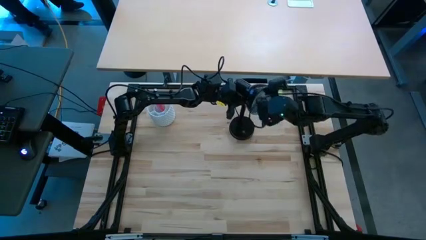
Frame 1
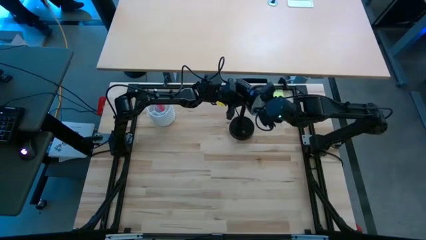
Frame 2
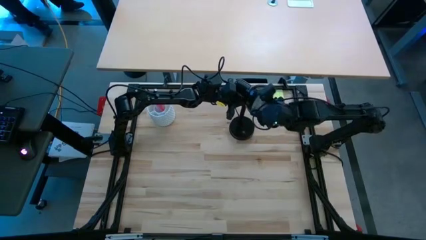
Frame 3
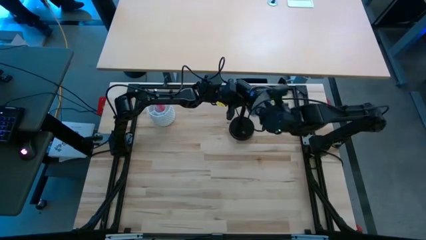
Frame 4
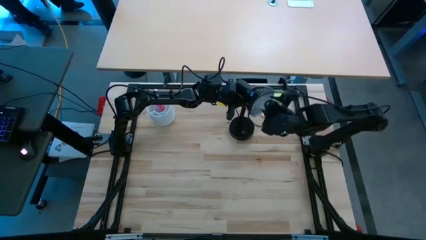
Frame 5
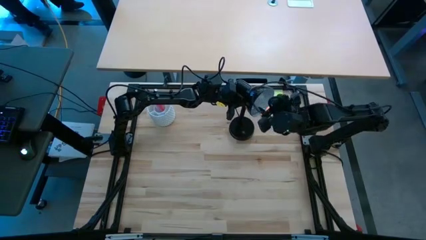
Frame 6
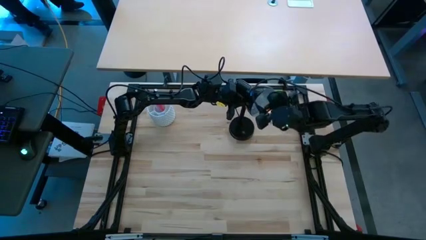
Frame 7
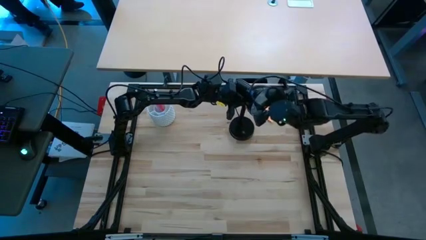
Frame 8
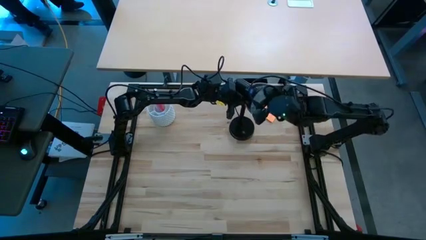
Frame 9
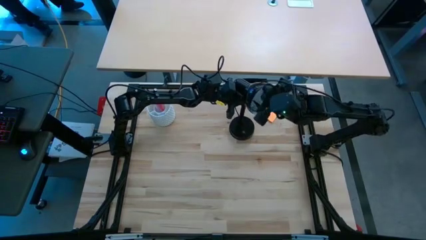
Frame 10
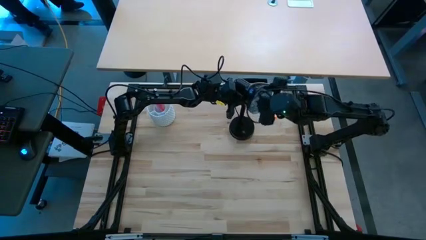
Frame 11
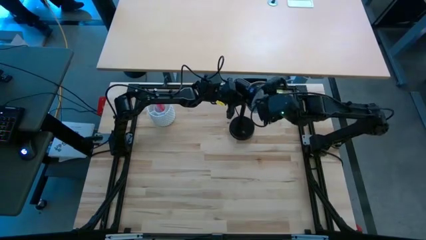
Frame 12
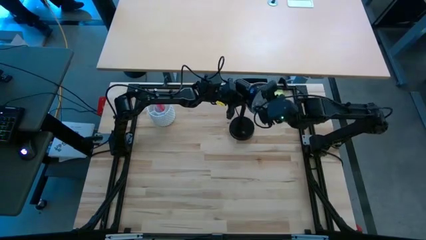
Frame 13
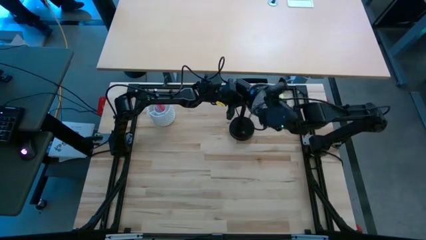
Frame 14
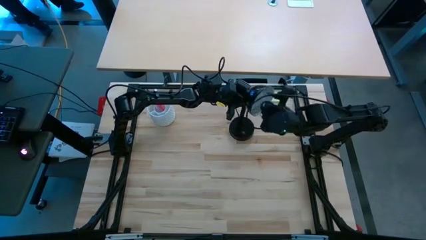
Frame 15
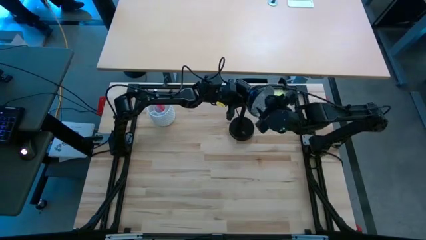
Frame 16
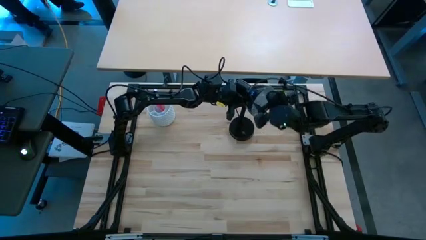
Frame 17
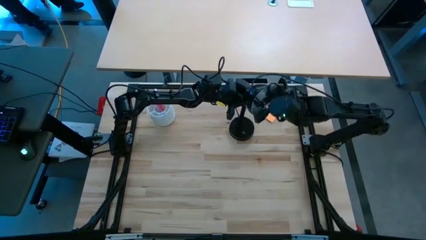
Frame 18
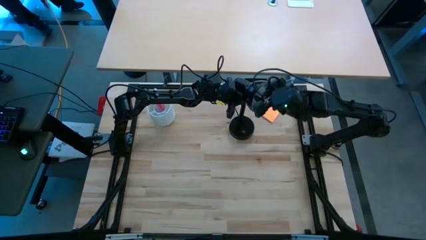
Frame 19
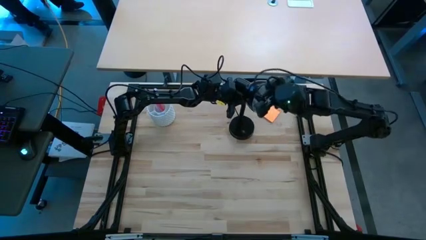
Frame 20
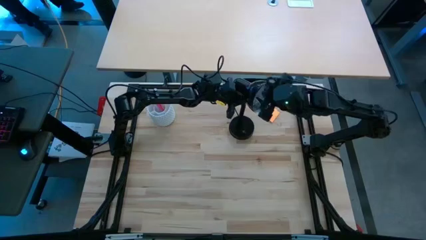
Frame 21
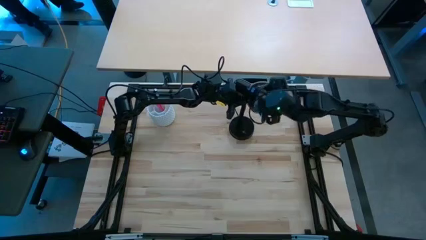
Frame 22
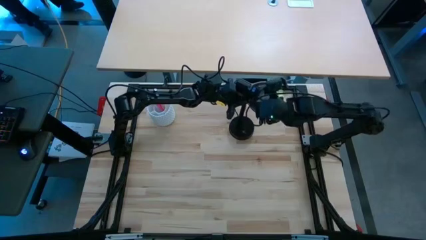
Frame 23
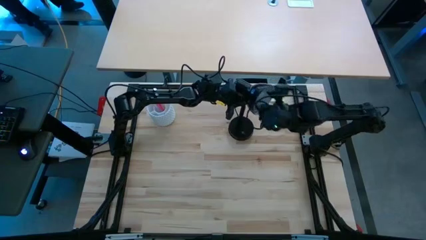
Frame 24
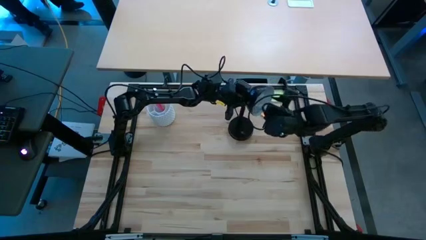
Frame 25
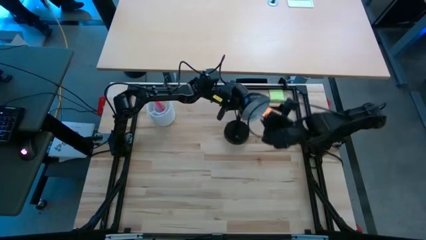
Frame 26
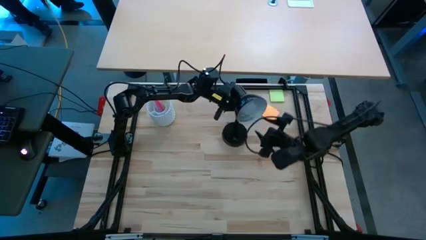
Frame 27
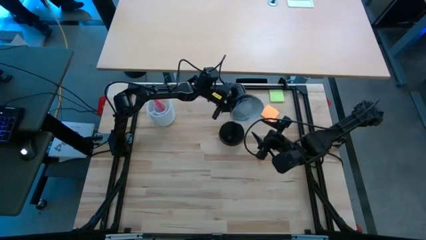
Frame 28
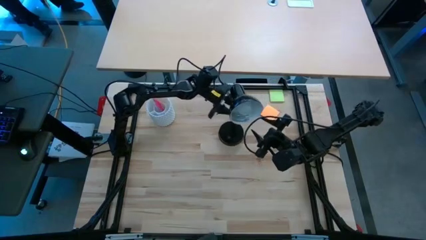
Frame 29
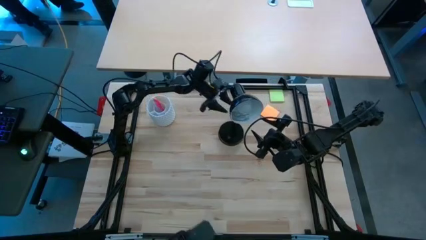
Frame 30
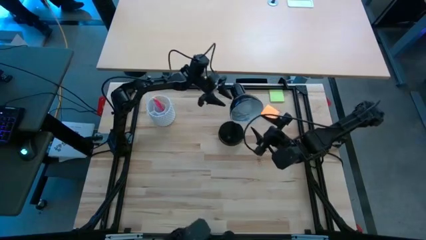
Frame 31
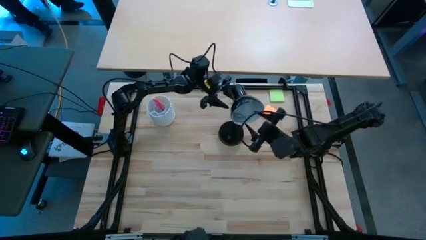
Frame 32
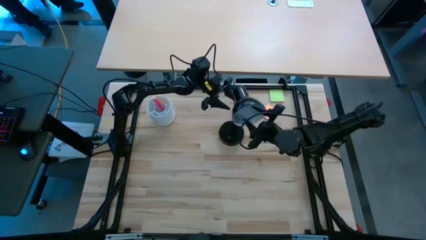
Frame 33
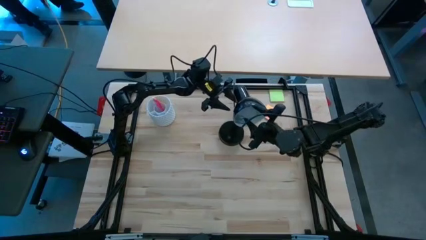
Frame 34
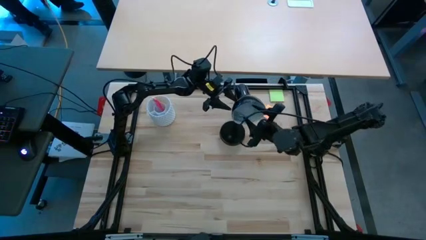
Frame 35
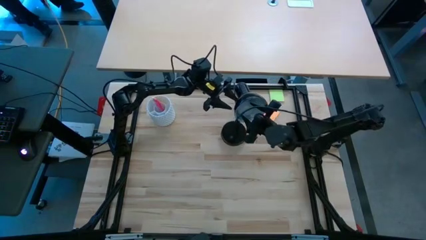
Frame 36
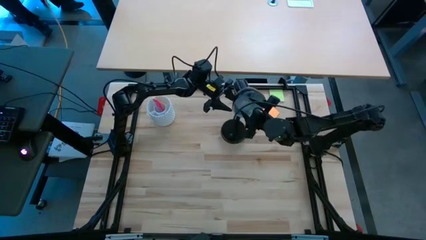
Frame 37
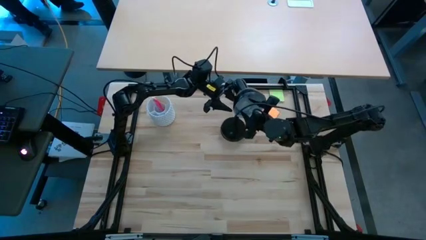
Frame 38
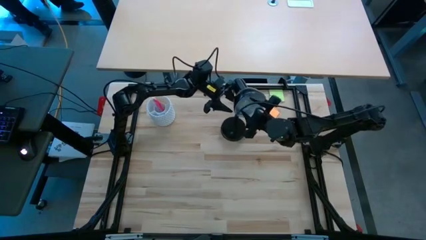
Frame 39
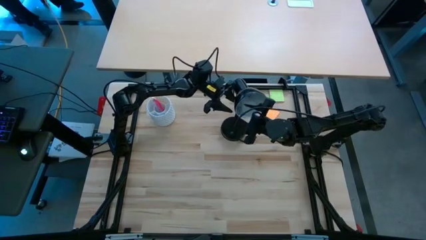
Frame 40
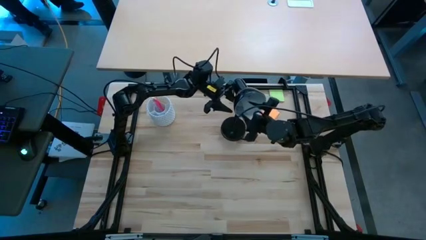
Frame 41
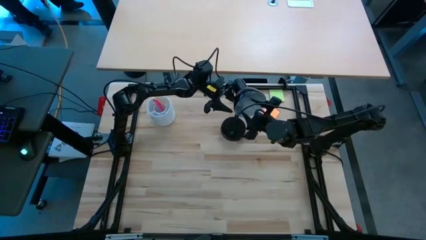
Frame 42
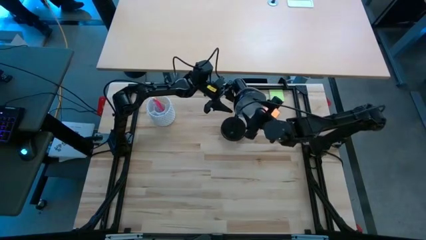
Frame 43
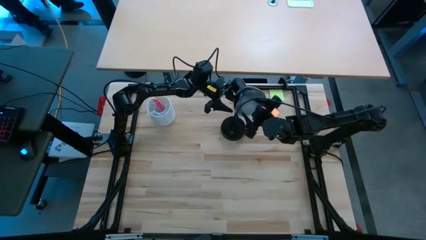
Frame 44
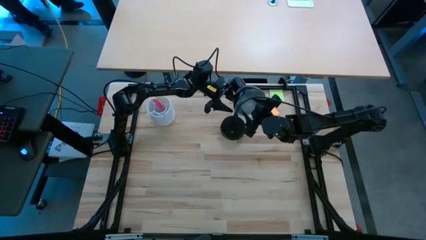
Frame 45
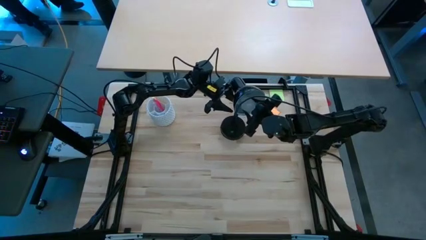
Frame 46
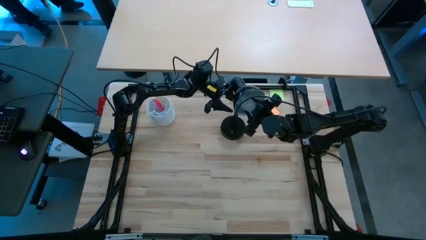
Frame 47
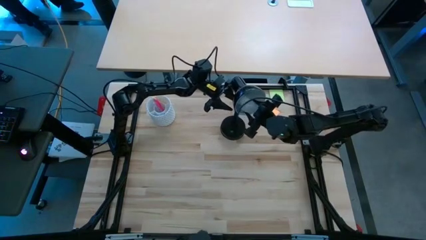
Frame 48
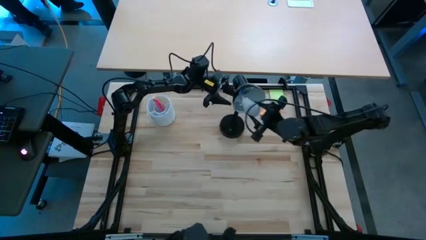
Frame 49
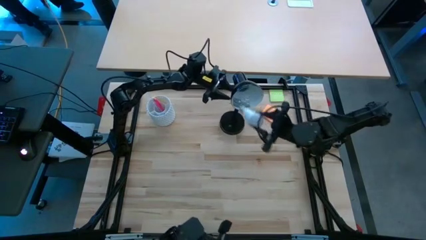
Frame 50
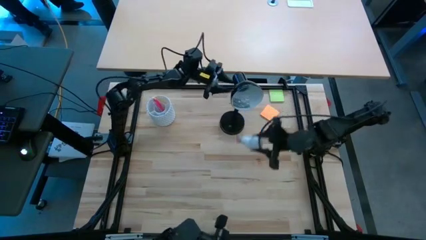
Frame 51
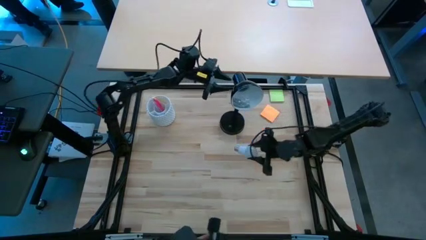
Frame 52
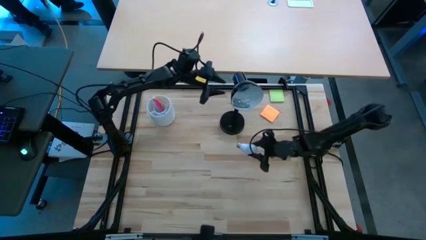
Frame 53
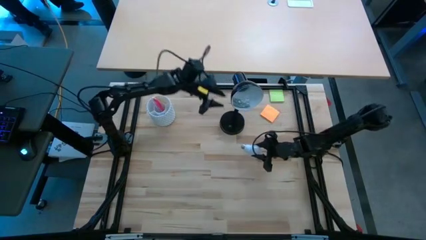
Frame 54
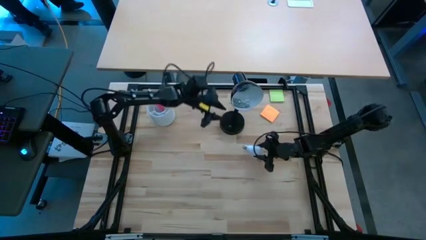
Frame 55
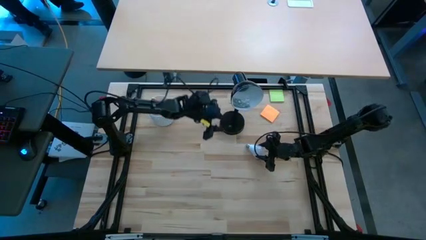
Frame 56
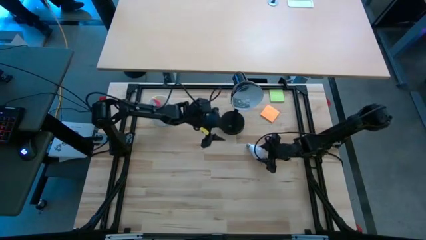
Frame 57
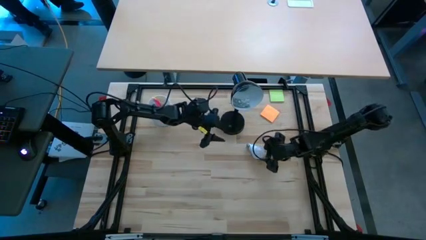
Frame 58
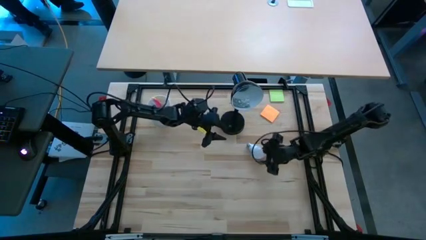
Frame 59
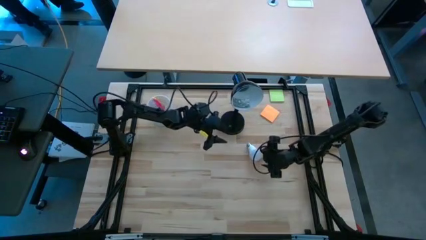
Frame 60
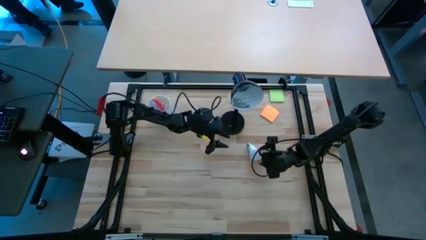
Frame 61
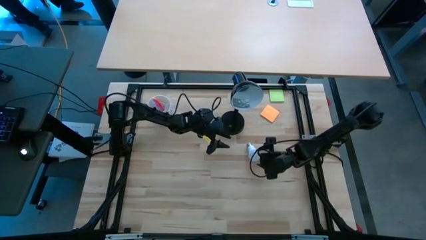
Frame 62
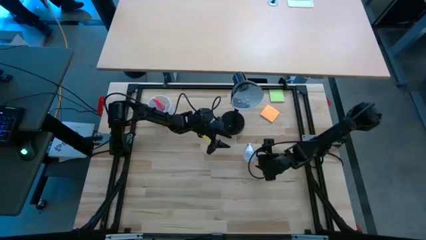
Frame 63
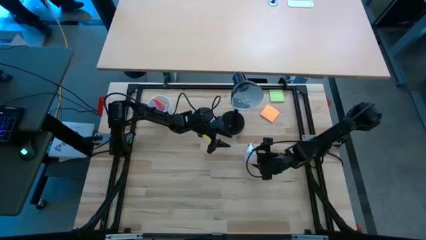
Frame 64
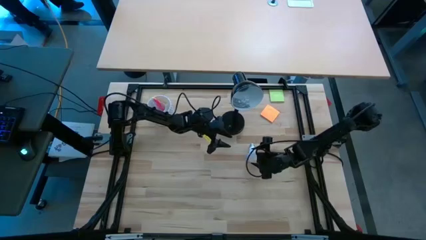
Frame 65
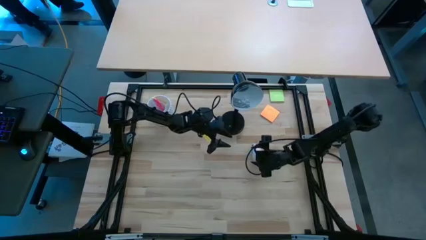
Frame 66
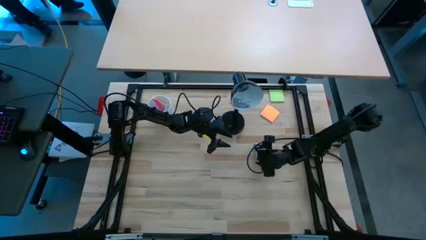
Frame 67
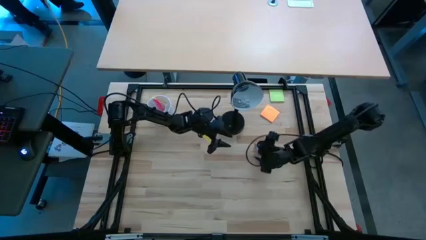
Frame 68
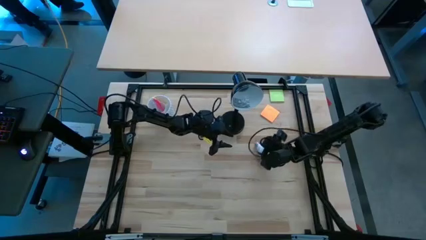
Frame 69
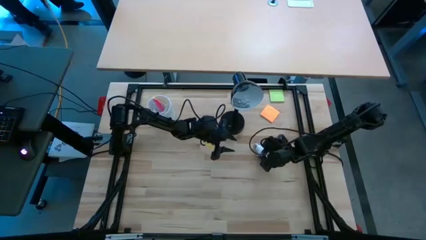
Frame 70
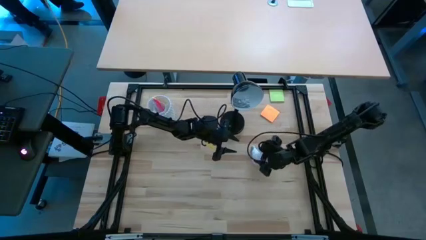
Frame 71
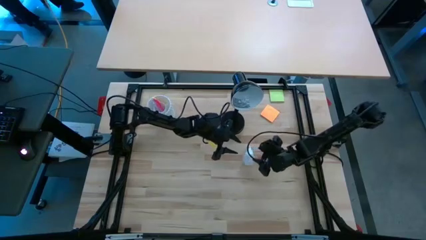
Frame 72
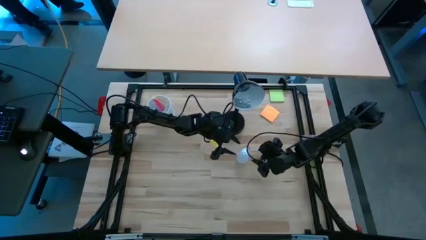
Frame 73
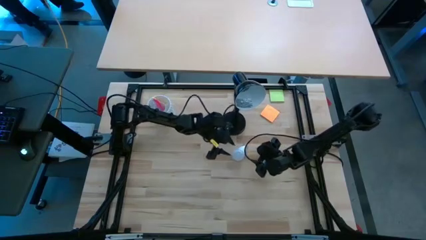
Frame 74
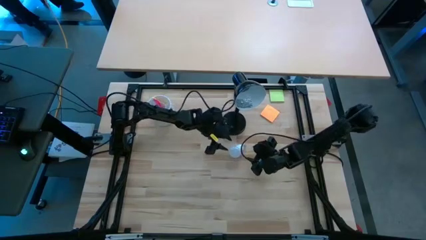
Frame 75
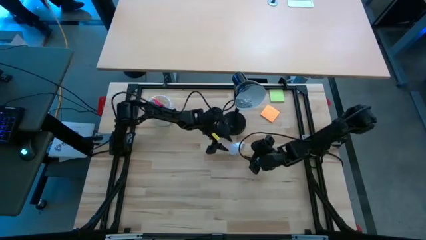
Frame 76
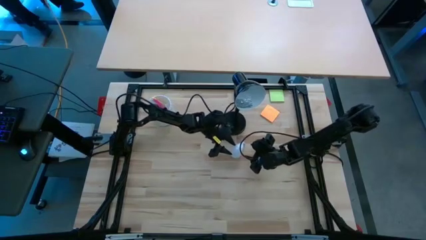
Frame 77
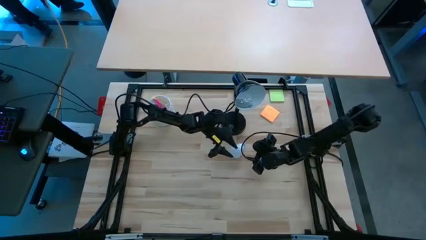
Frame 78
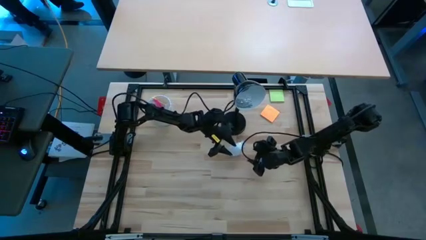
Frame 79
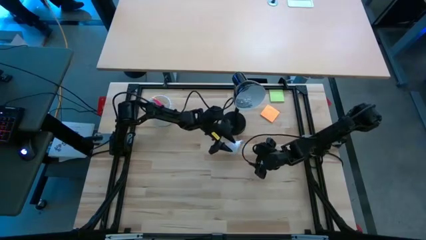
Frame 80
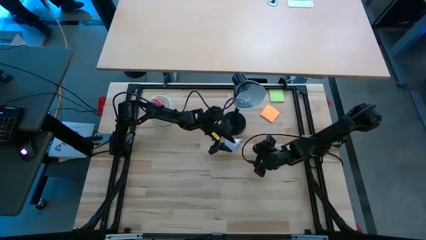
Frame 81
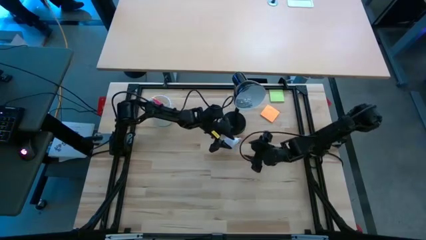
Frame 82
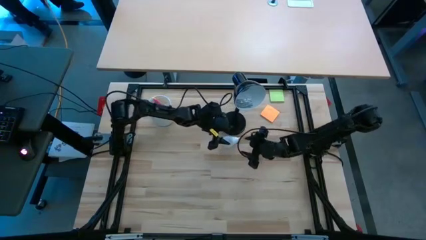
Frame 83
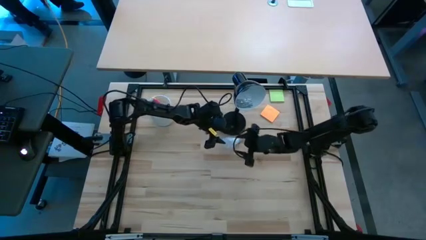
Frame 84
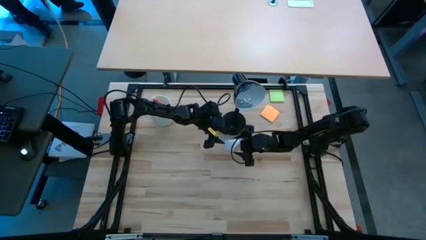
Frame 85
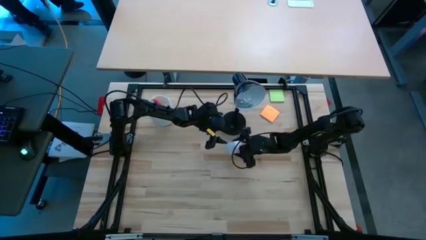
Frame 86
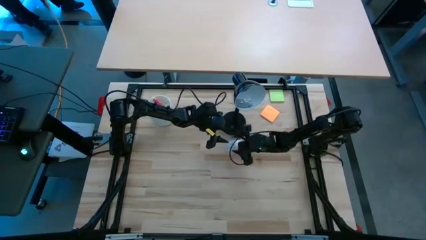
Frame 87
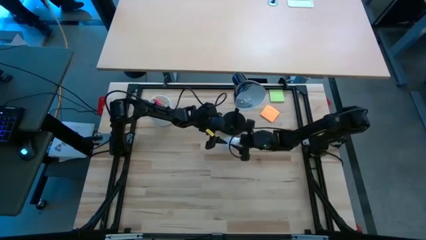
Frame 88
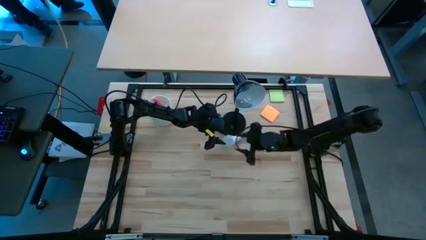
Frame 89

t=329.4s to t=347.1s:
Task: Screw lightbulb
Remove the light bulb from the desk lamp
